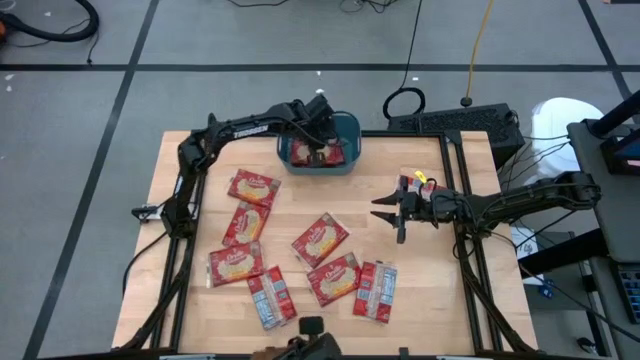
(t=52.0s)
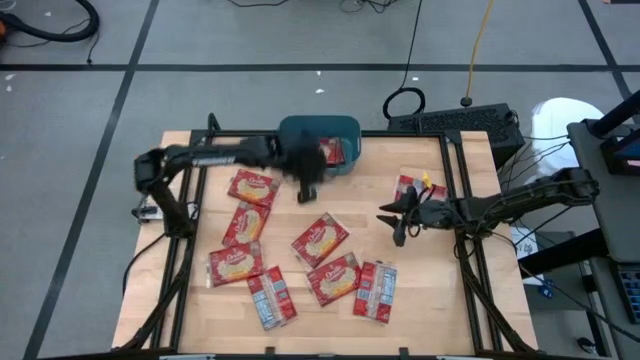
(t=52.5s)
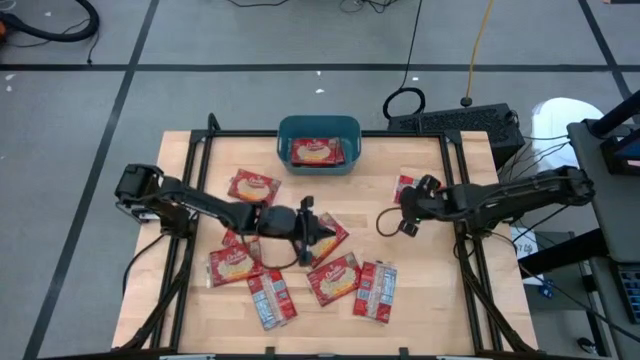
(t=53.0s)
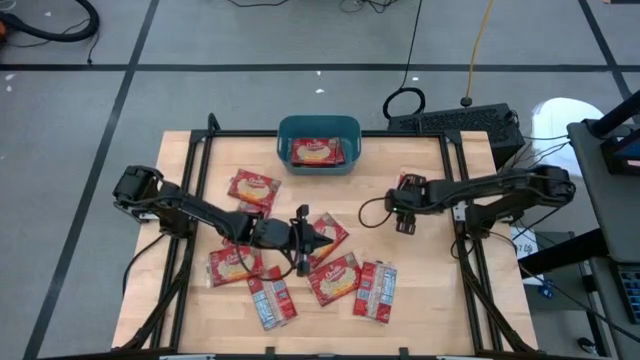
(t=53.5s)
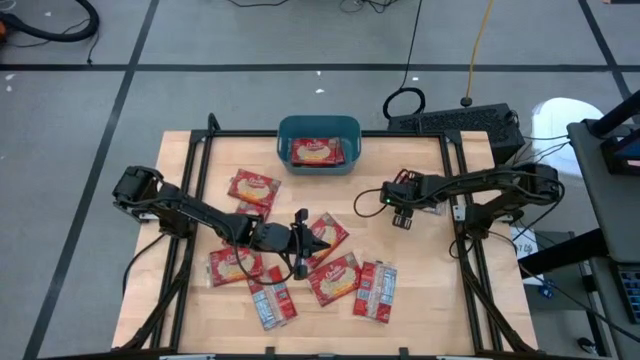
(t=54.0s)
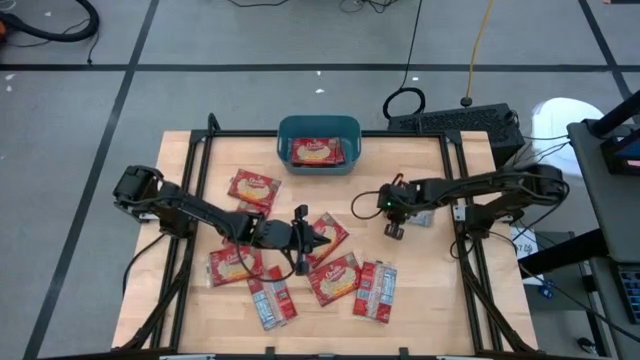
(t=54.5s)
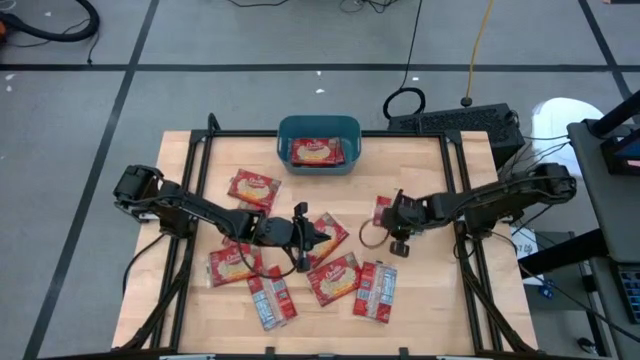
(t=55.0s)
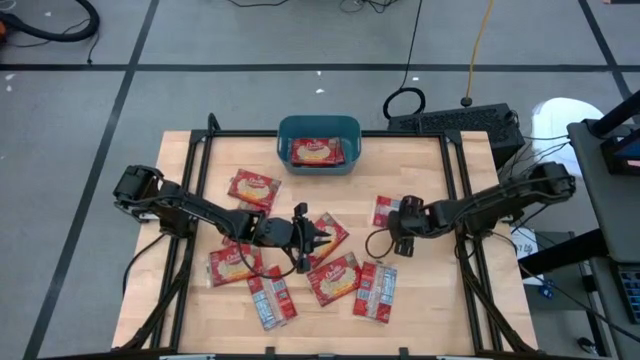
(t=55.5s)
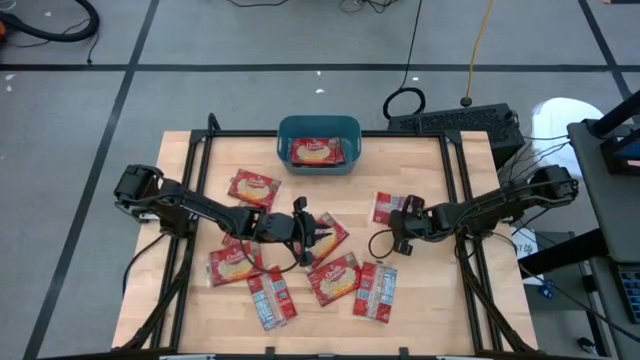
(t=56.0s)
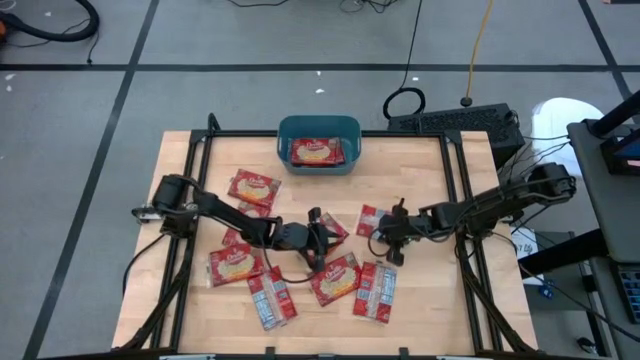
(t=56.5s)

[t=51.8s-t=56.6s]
Task: Sort popcorn bags into baskets
Put the red popcorn bag into the blue bin

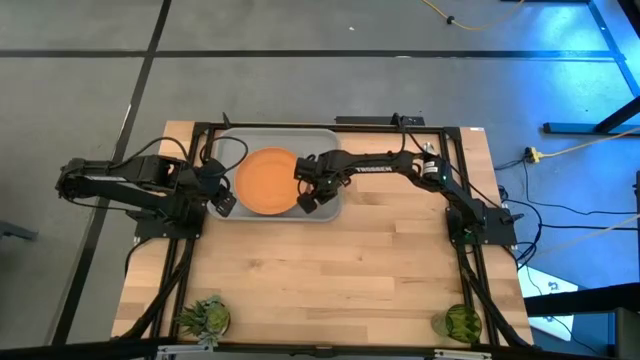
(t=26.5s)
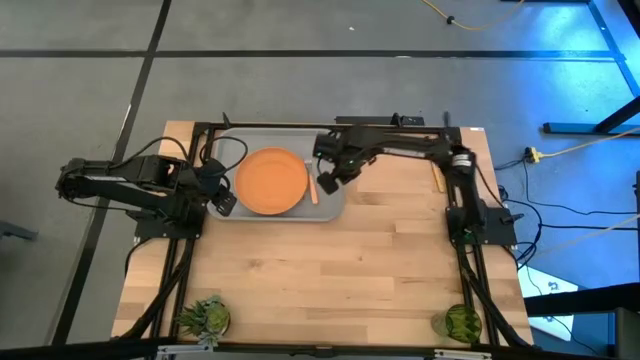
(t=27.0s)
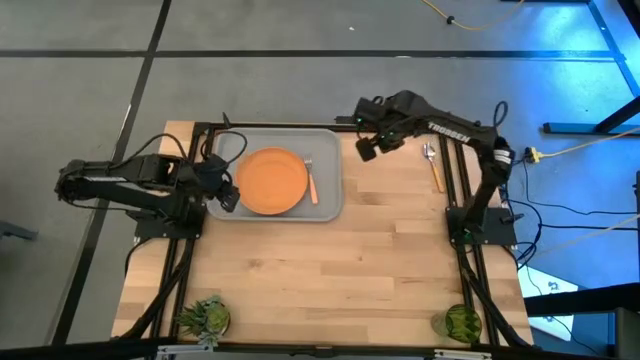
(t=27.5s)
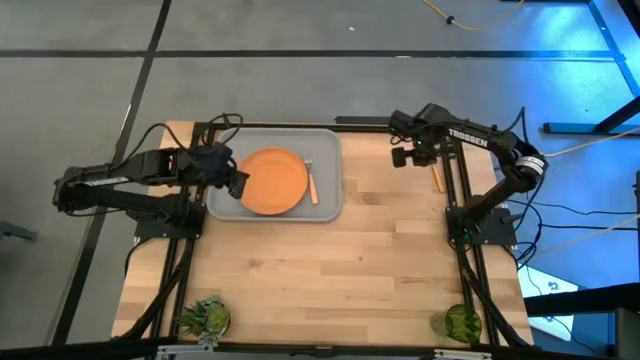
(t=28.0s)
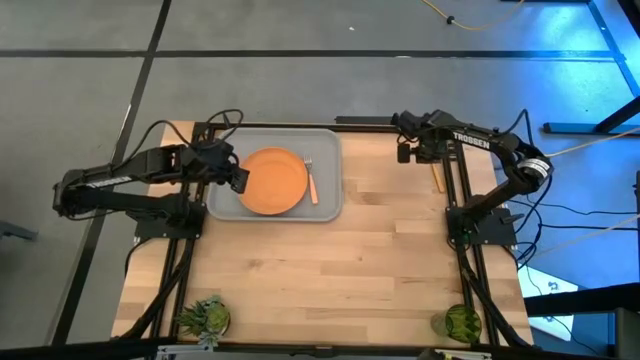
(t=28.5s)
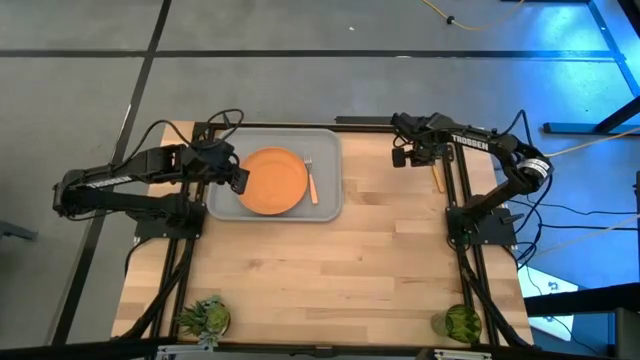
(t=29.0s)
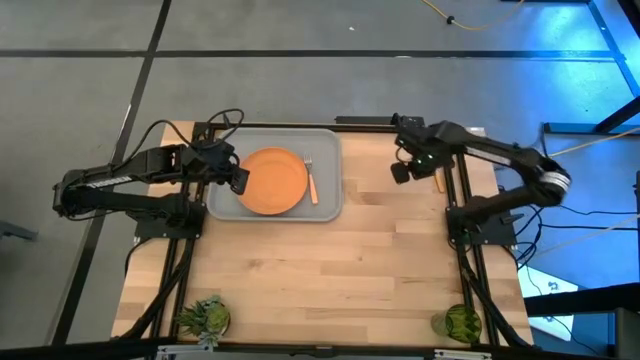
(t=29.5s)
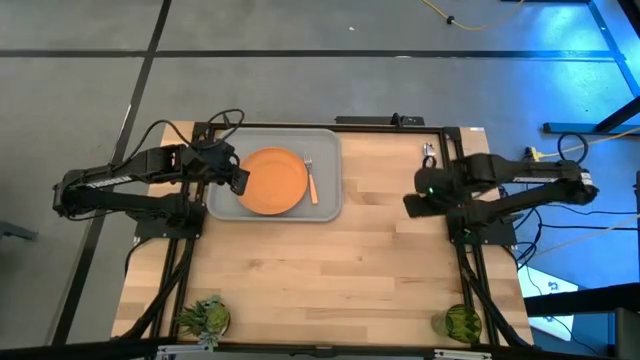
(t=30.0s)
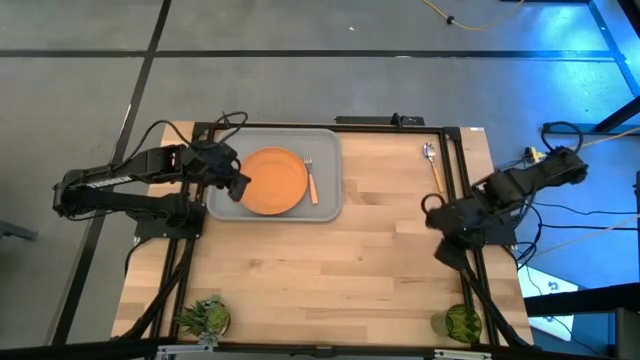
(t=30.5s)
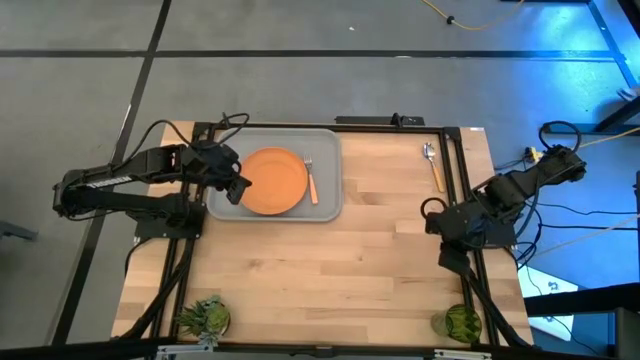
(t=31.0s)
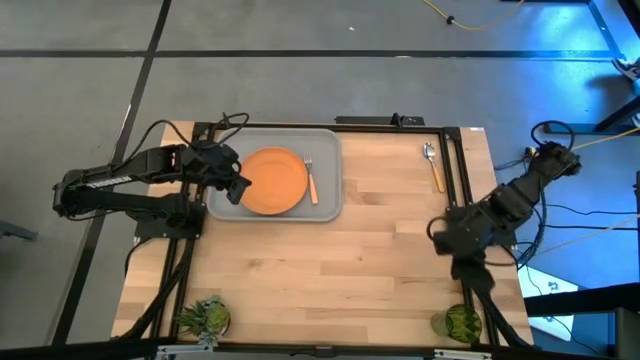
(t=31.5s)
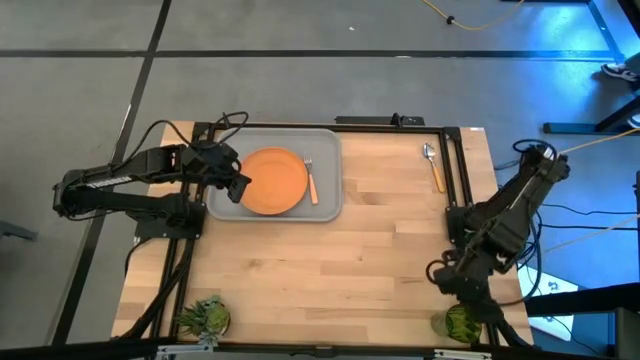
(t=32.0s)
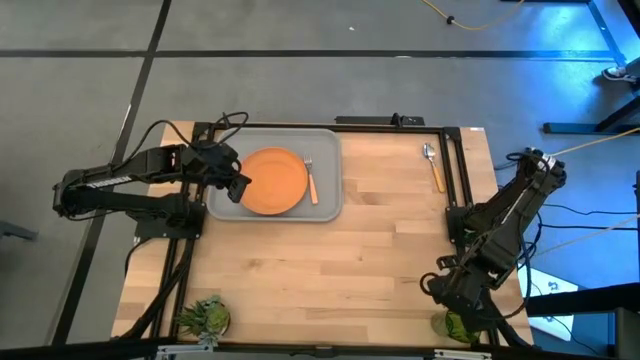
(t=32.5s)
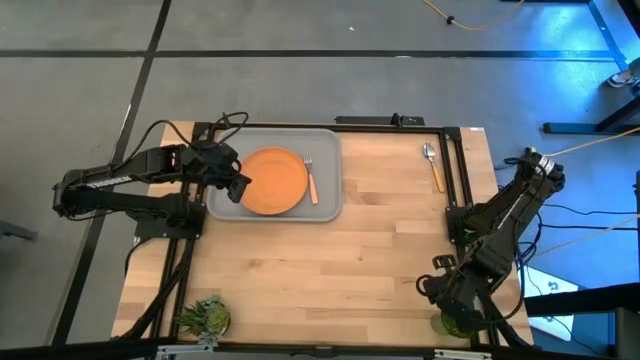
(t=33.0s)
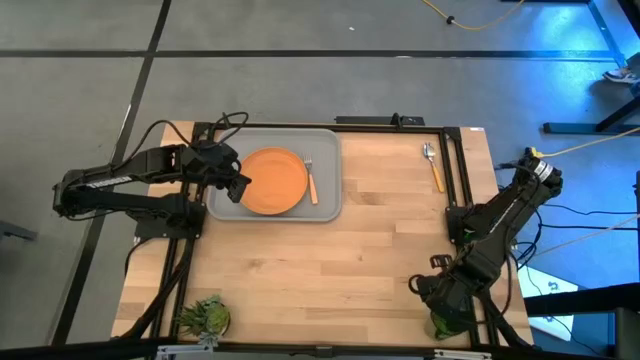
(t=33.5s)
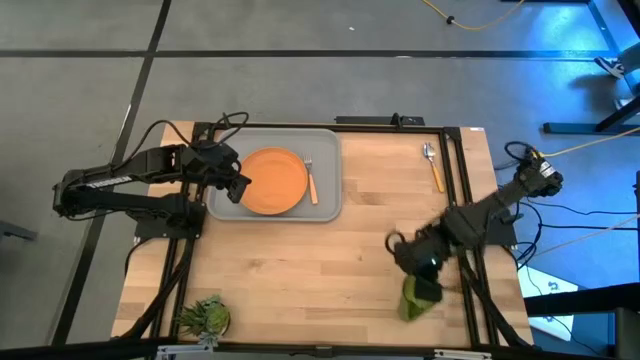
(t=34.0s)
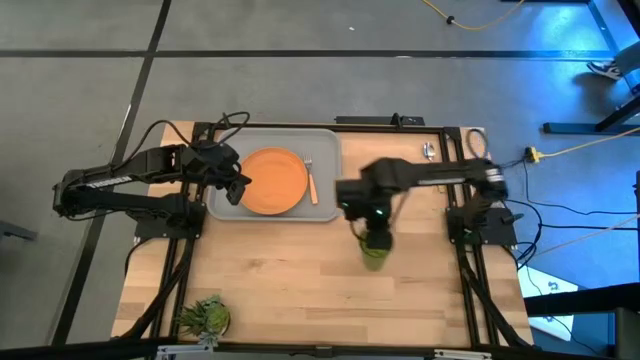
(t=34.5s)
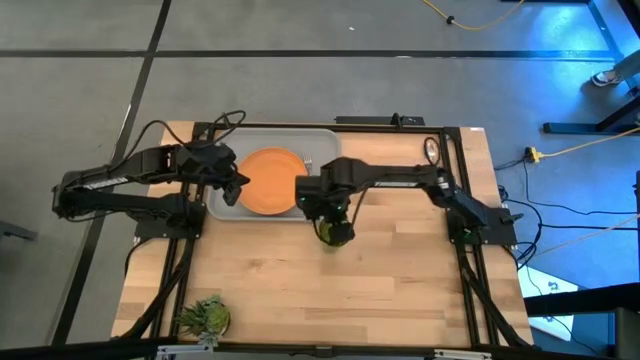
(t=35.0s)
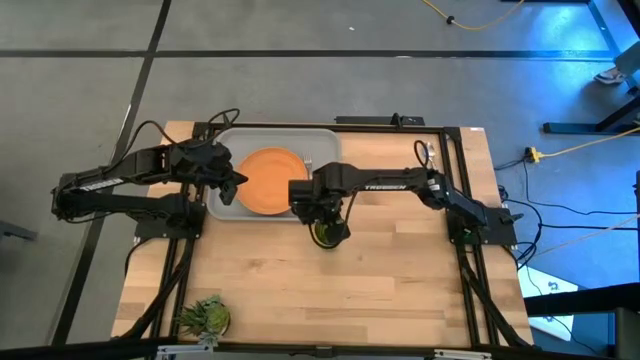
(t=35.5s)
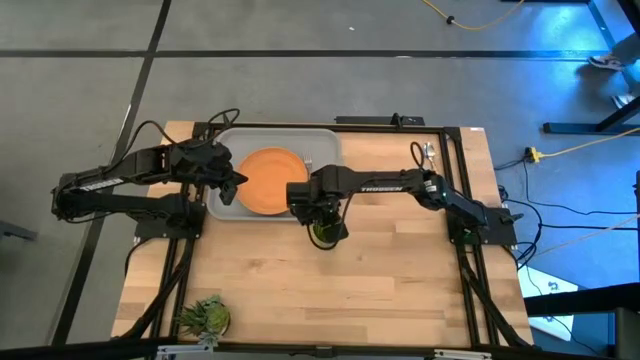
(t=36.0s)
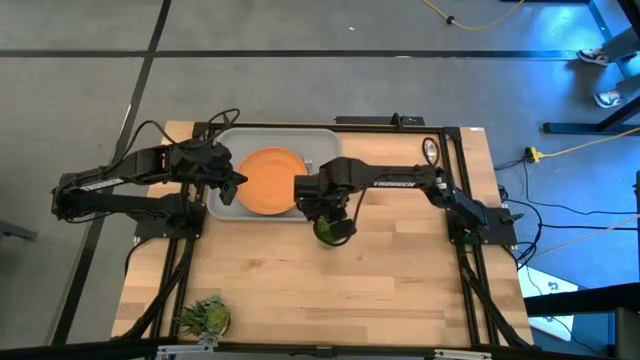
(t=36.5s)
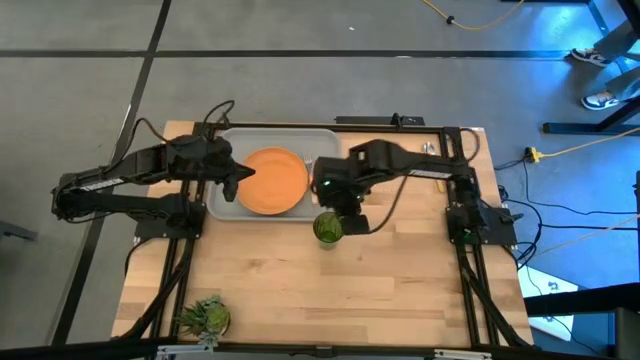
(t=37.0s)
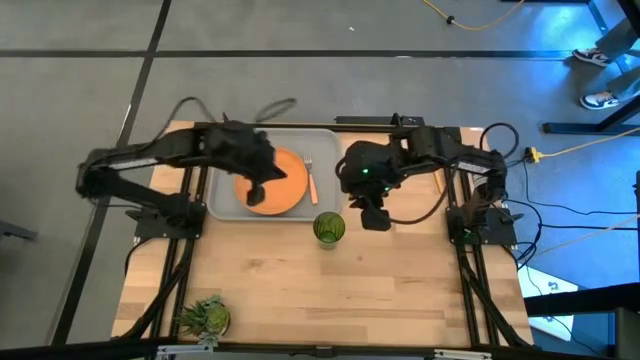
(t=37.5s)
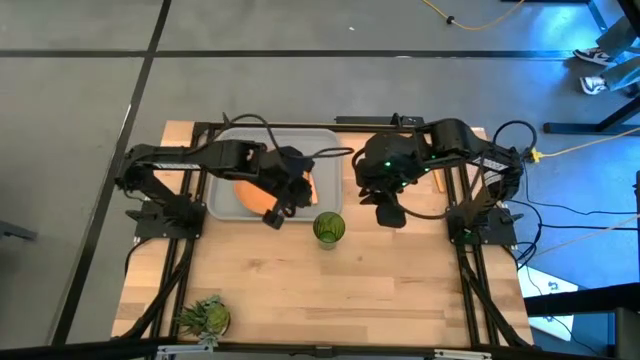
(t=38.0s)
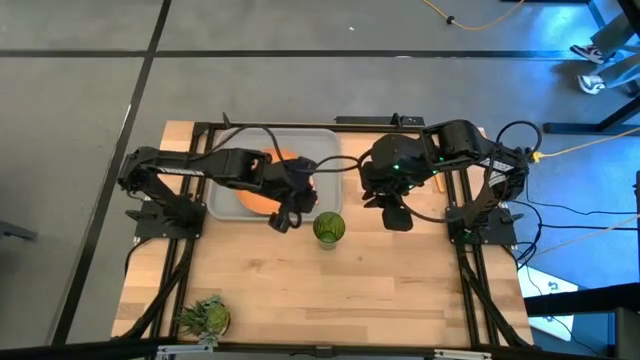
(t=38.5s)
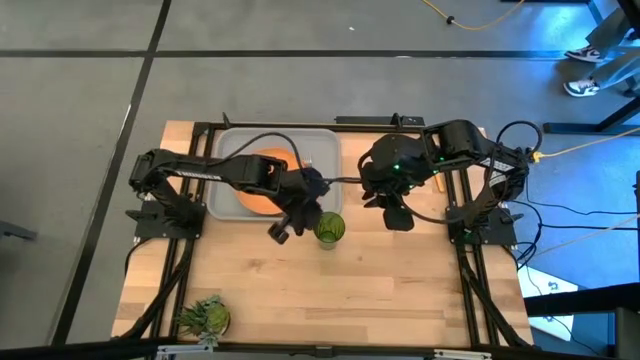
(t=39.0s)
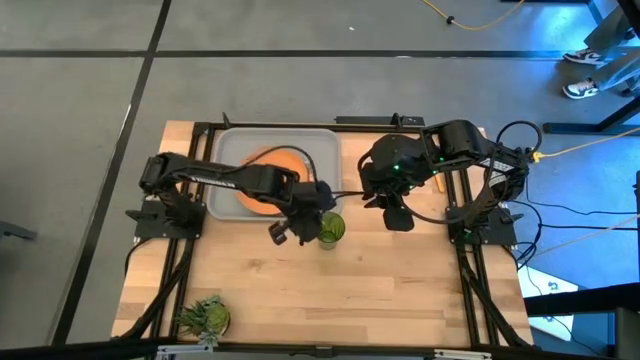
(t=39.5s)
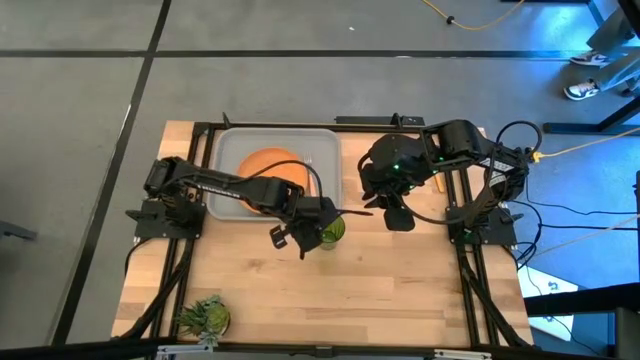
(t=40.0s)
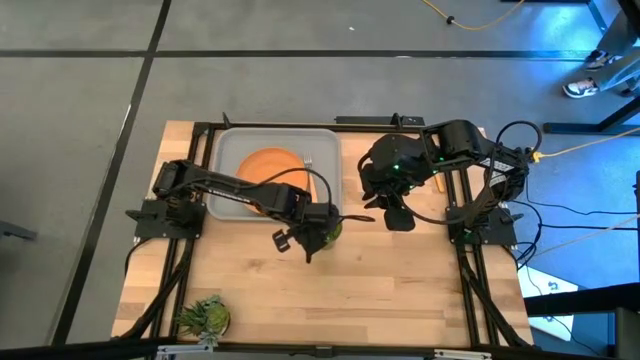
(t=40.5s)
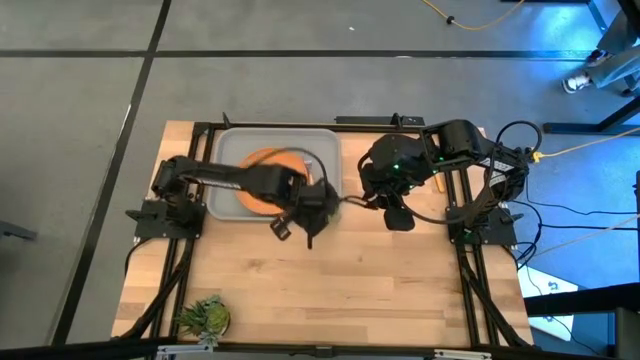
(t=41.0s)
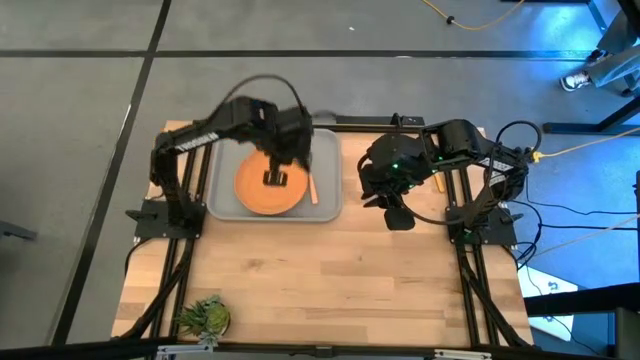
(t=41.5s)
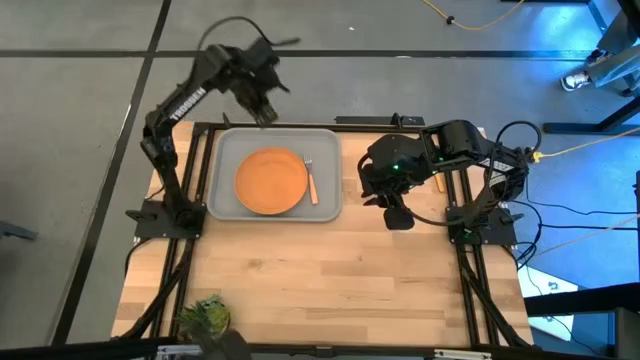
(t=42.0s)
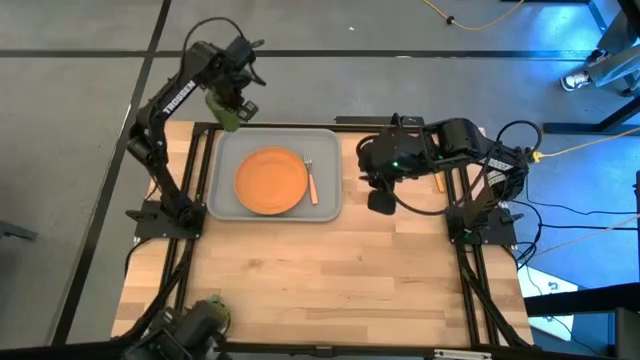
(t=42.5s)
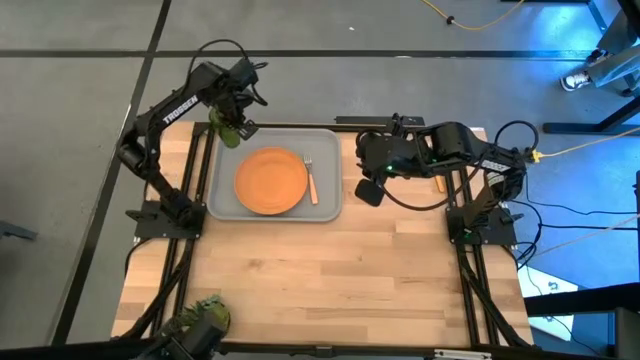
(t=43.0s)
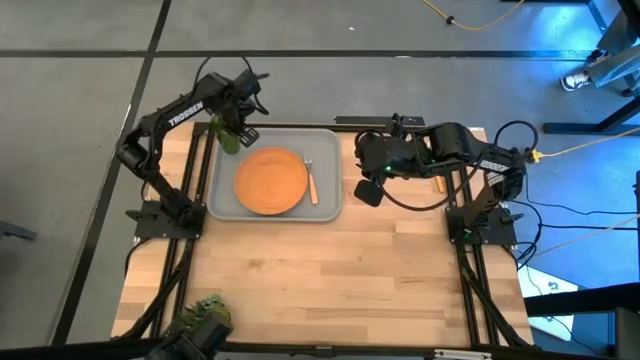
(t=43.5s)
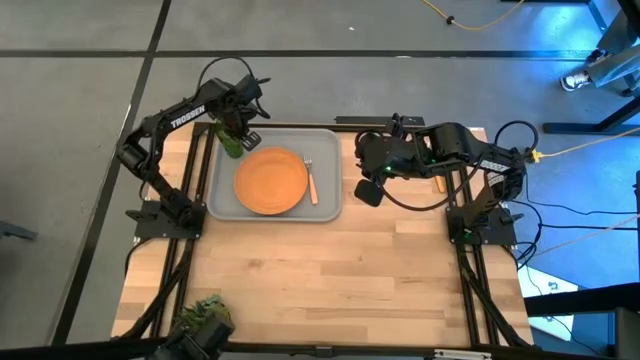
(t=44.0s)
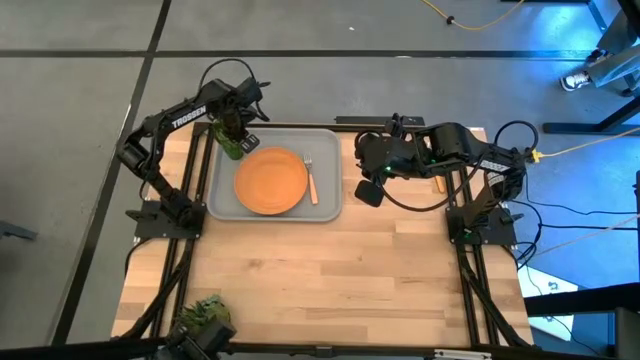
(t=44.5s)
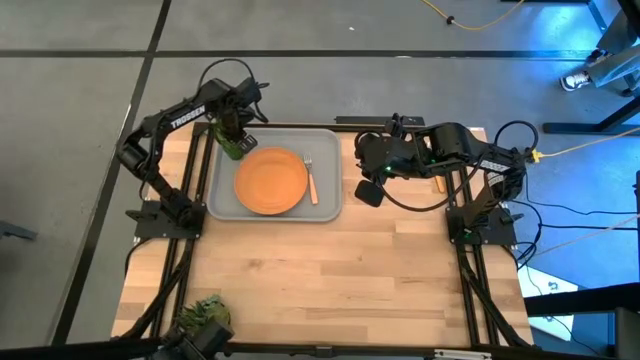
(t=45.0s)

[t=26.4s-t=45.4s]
Task: Pick and place plate/cup/fork/spoon on tray
Put the green glass on the gray serving tray to the top left of the orange plate
